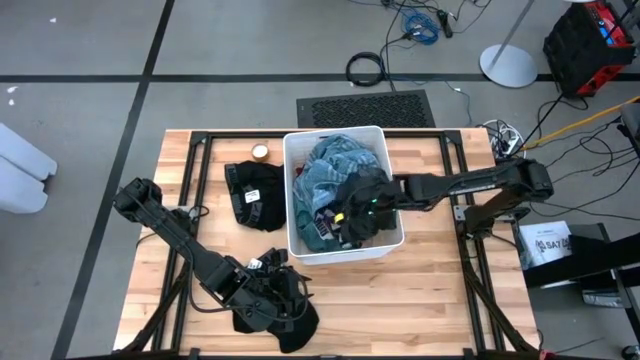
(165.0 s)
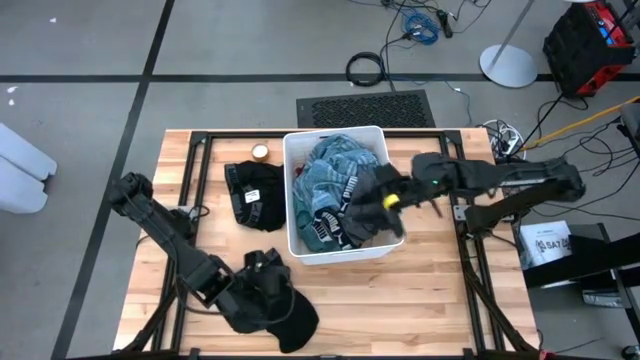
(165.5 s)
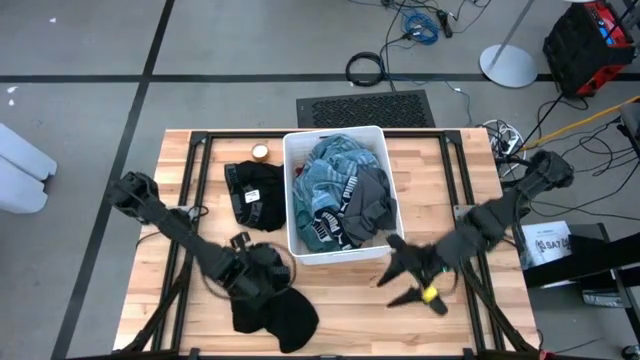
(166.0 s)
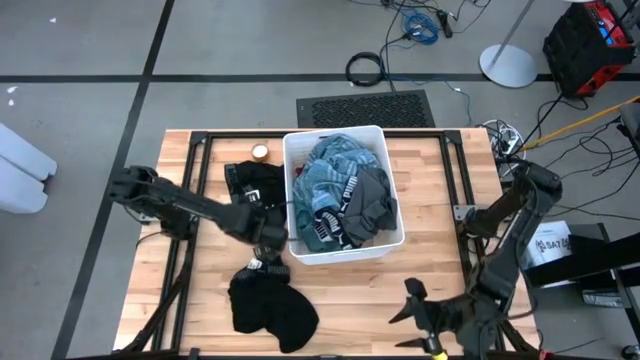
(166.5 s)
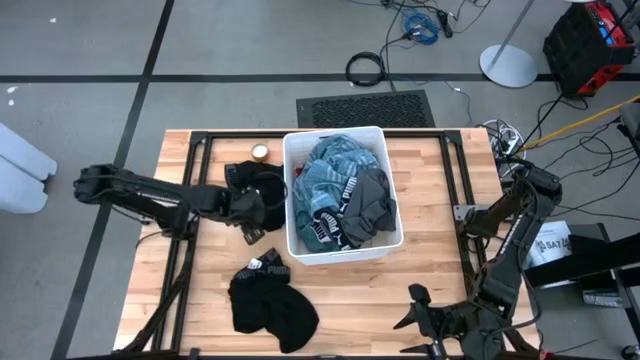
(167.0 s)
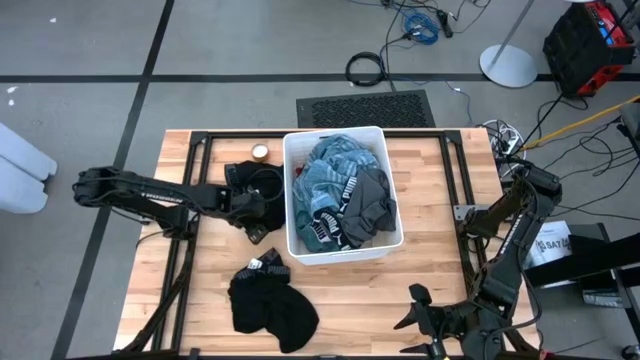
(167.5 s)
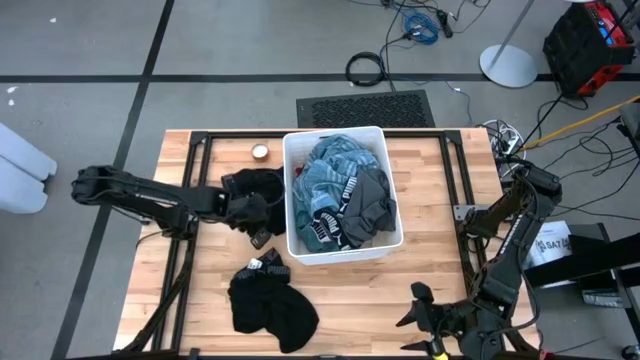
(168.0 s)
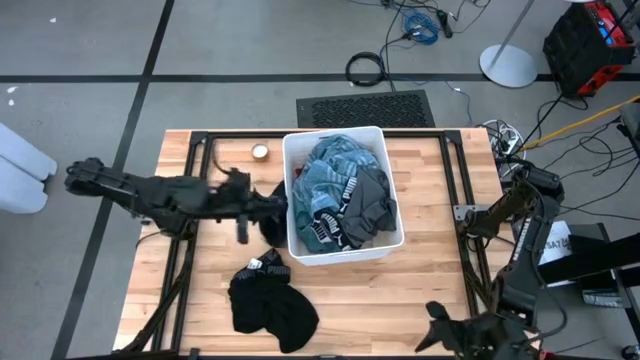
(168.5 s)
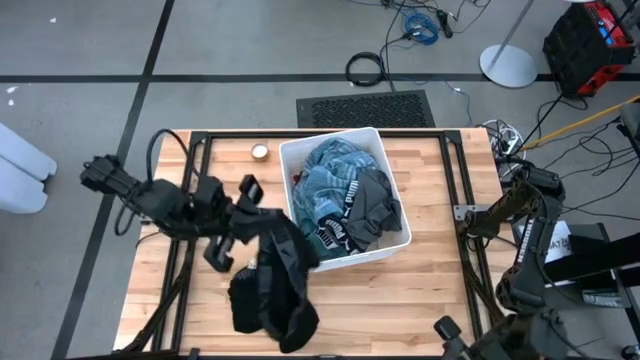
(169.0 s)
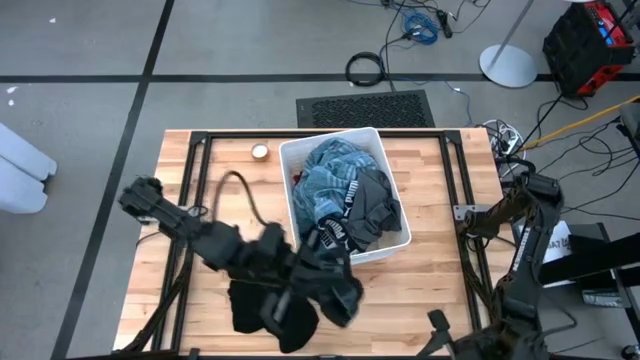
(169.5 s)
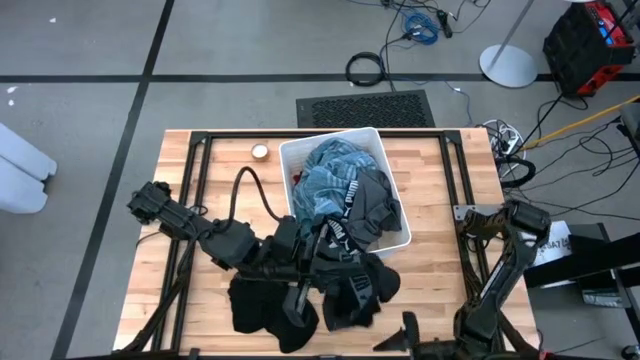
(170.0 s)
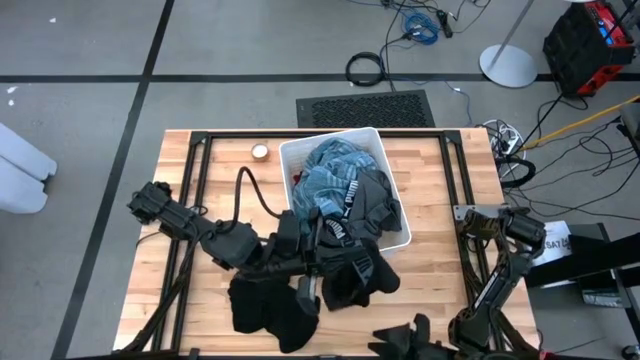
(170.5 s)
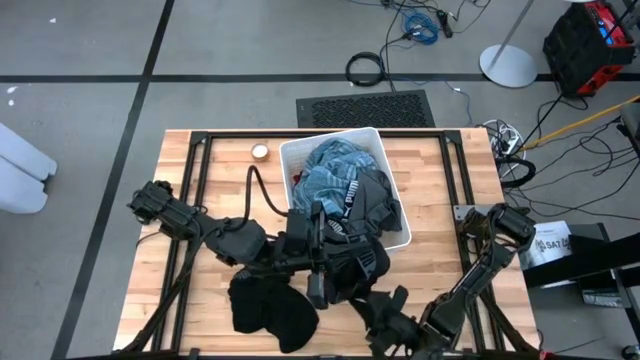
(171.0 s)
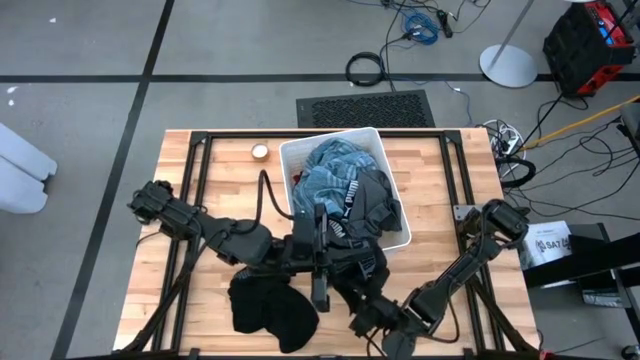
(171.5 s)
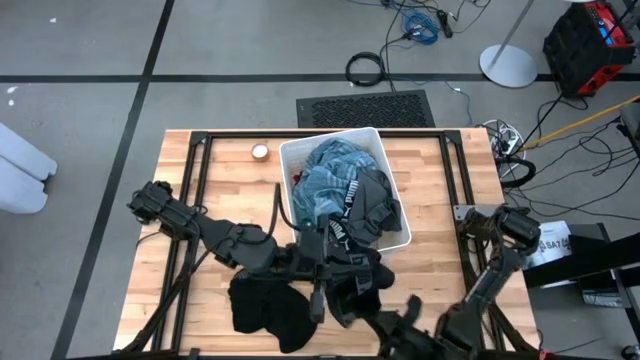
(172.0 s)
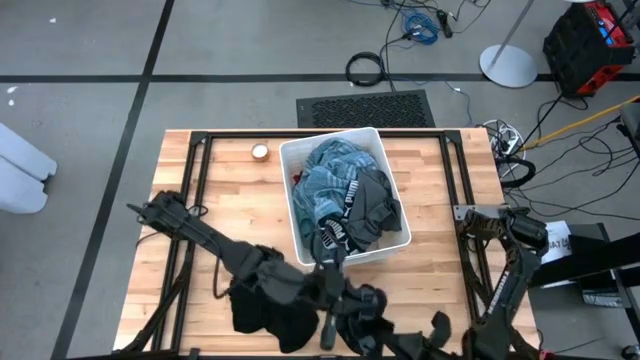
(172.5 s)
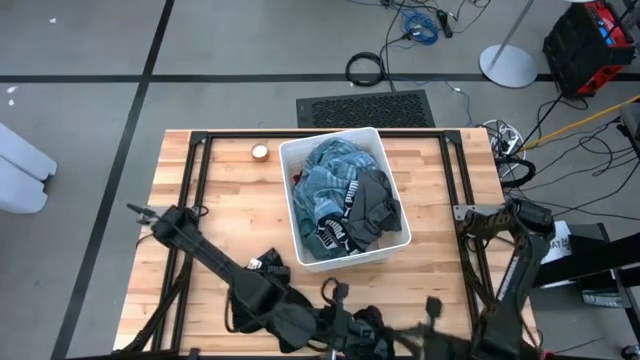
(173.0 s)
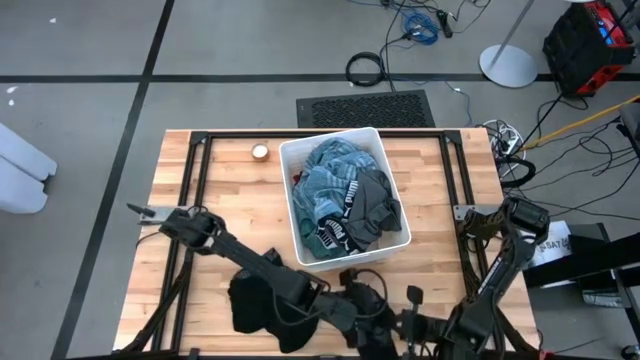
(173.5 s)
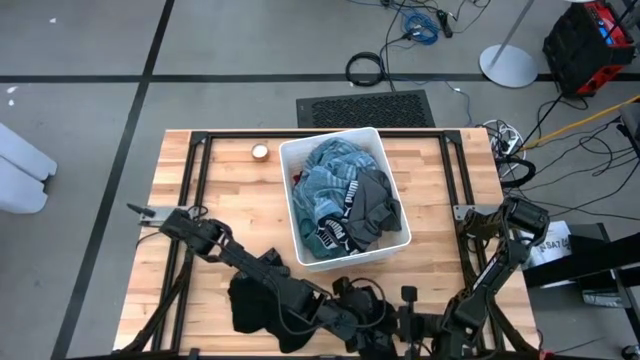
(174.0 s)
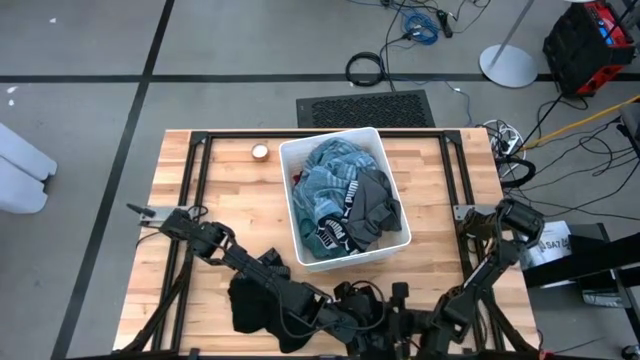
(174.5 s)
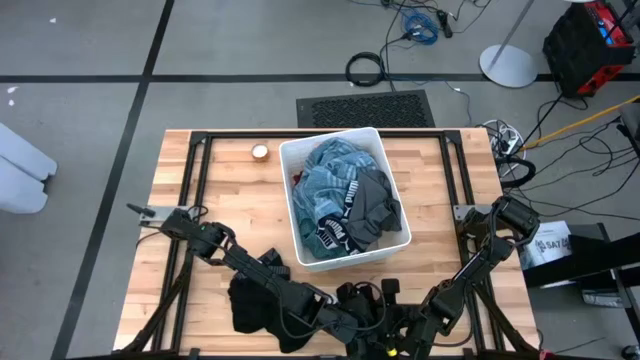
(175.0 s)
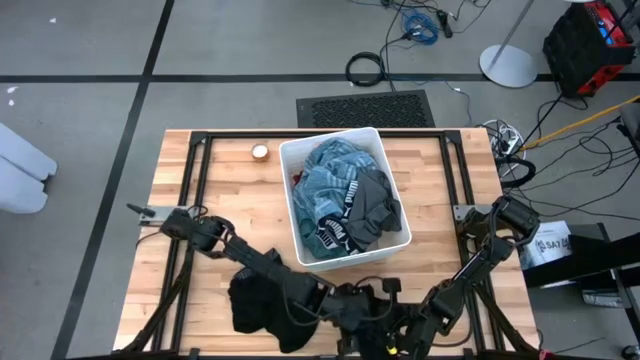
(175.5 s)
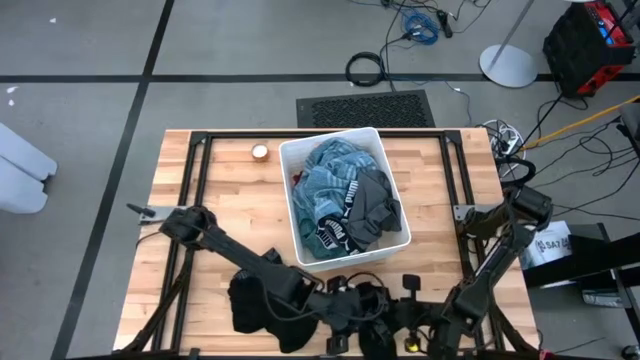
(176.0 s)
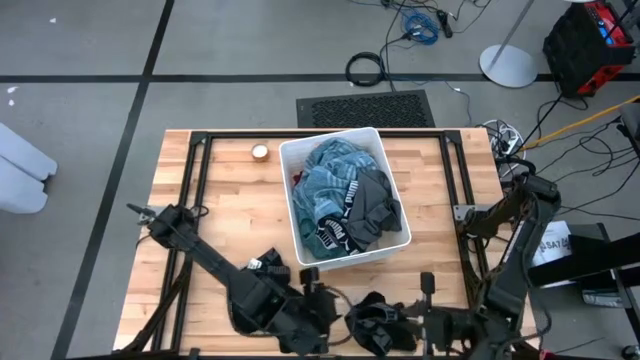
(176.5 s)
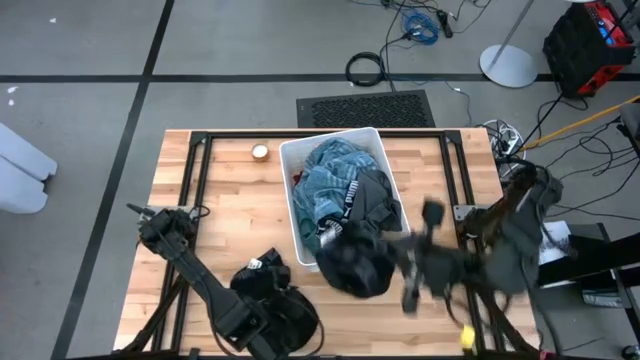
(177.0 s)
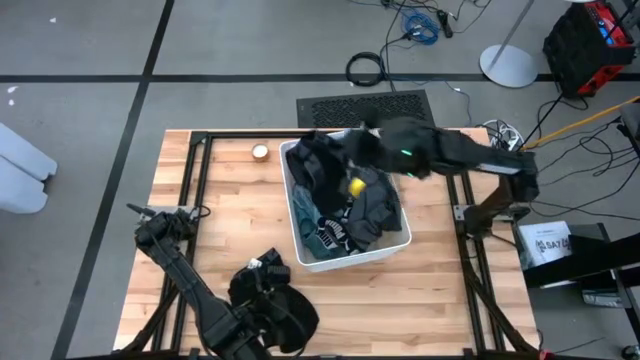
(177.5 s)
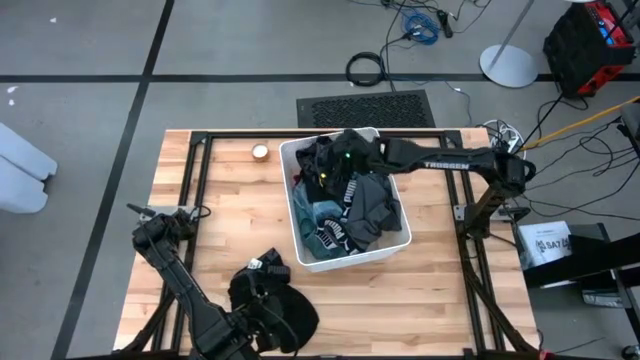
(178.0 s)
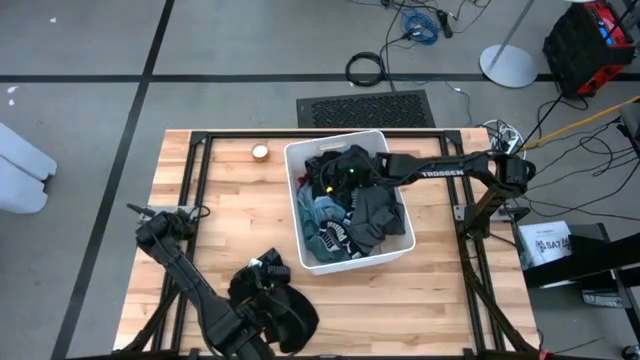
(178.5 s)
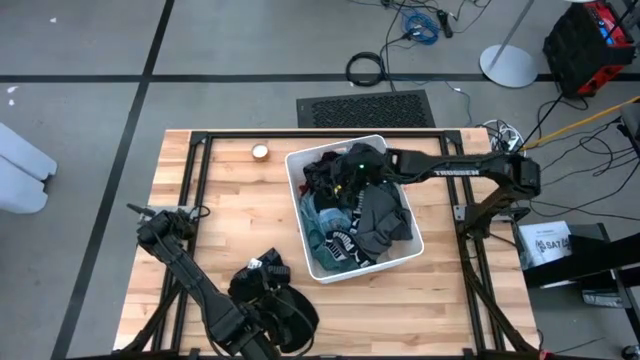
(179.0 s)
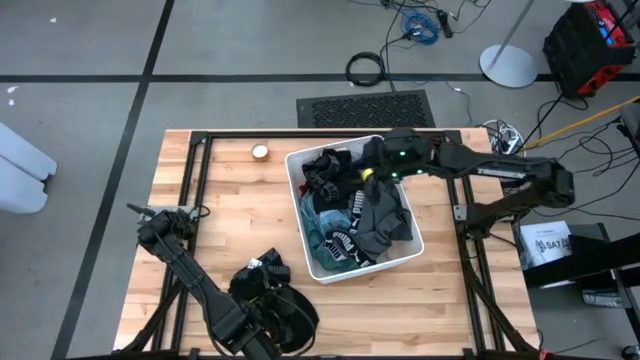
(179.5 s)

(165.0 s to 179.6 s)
Task: Sort clothes
Put the top black boxer into the laundry bin

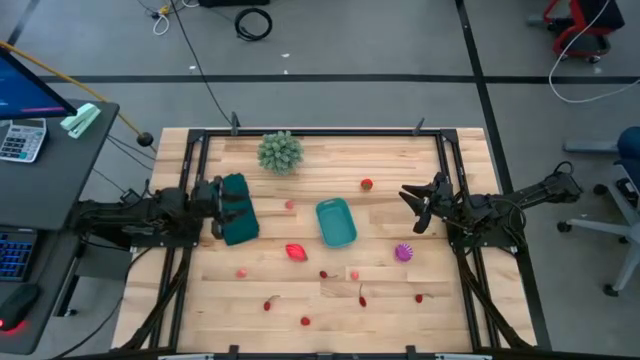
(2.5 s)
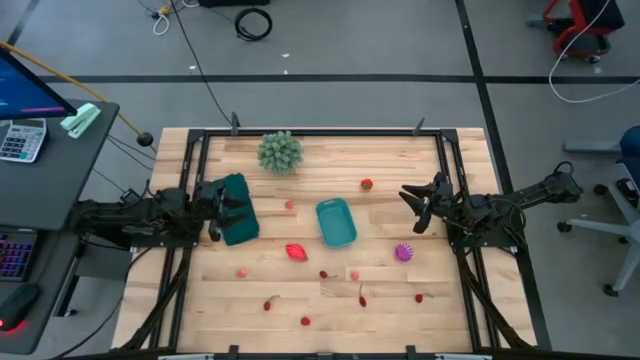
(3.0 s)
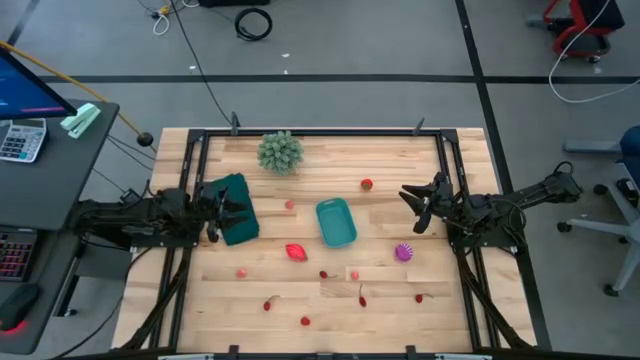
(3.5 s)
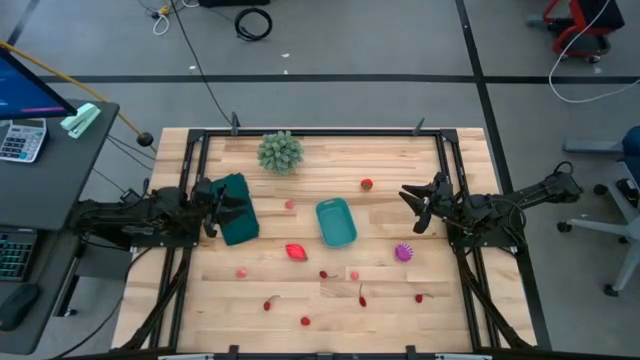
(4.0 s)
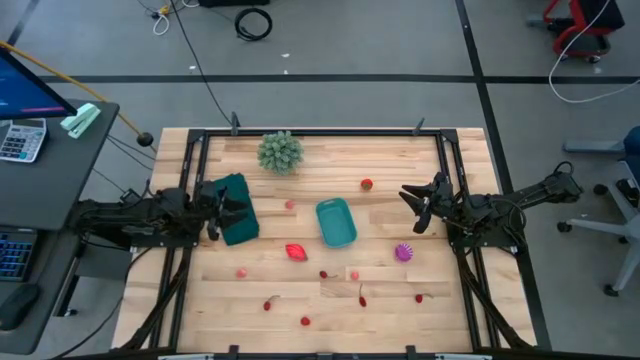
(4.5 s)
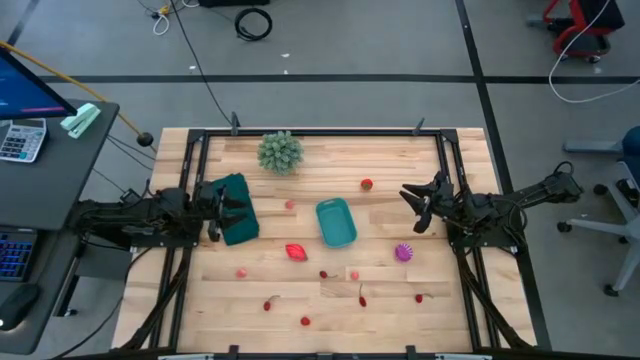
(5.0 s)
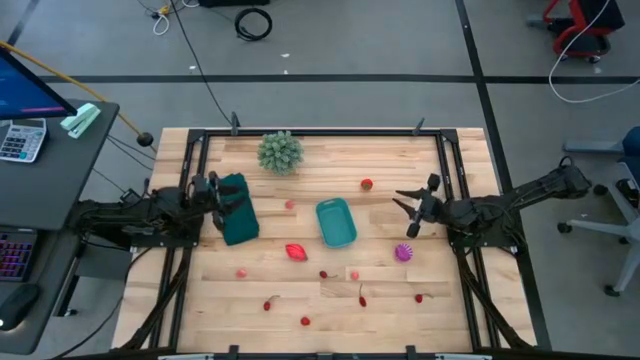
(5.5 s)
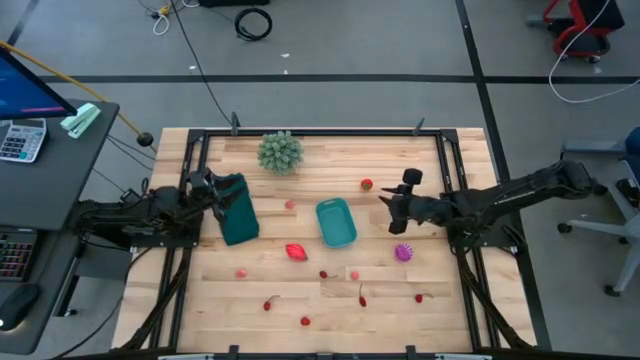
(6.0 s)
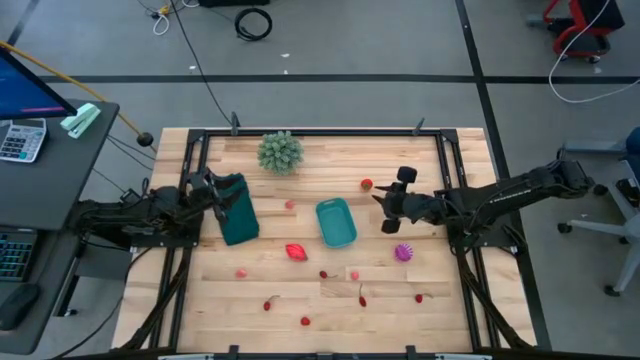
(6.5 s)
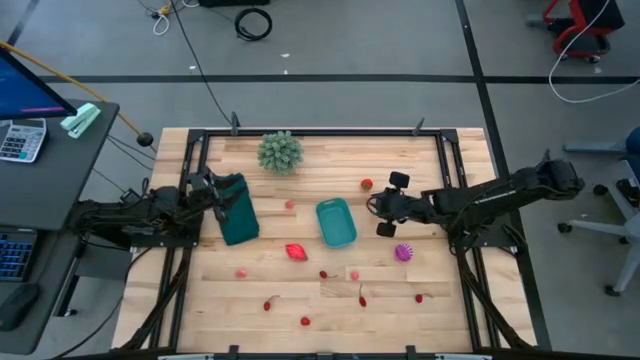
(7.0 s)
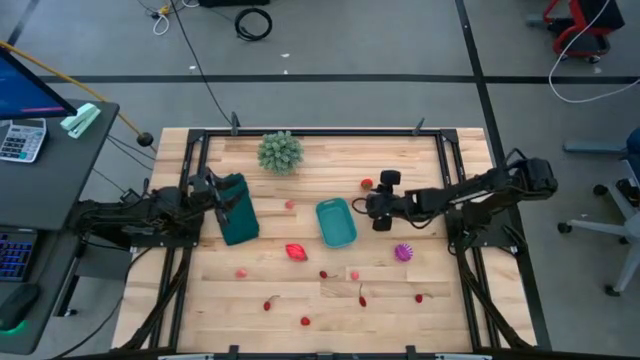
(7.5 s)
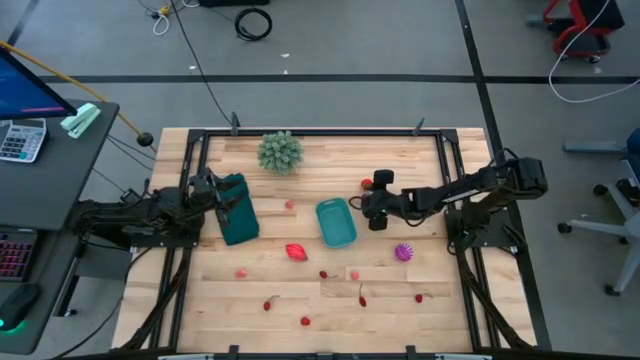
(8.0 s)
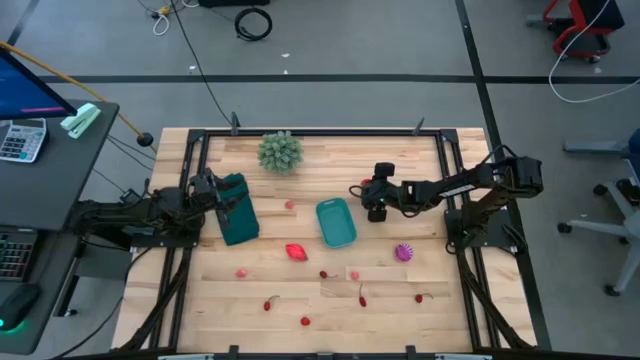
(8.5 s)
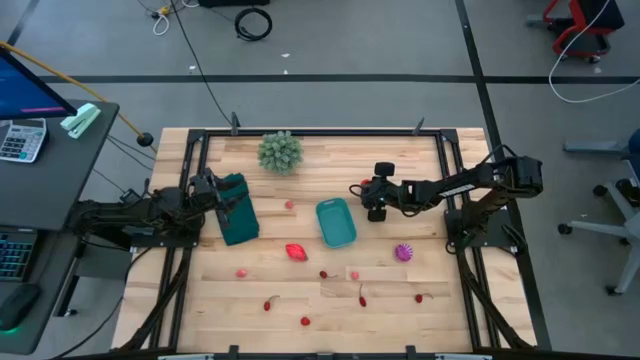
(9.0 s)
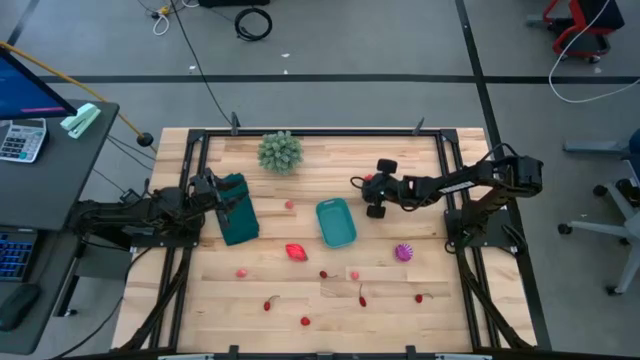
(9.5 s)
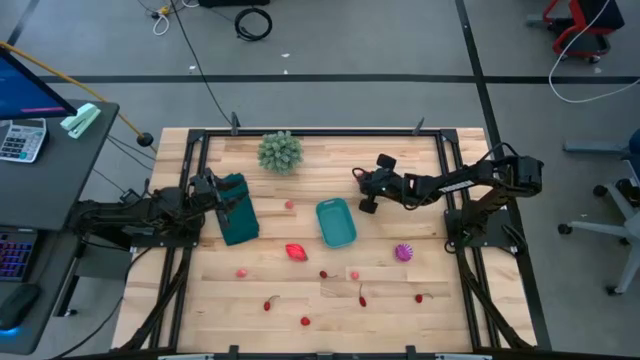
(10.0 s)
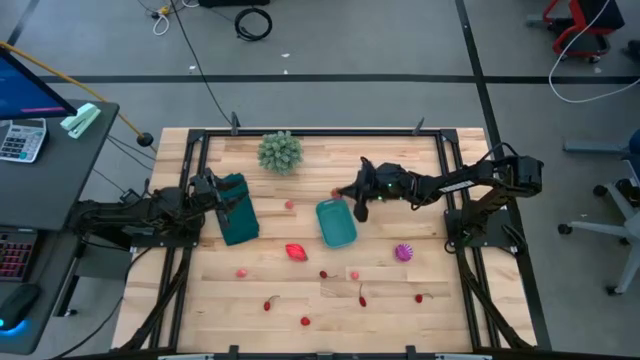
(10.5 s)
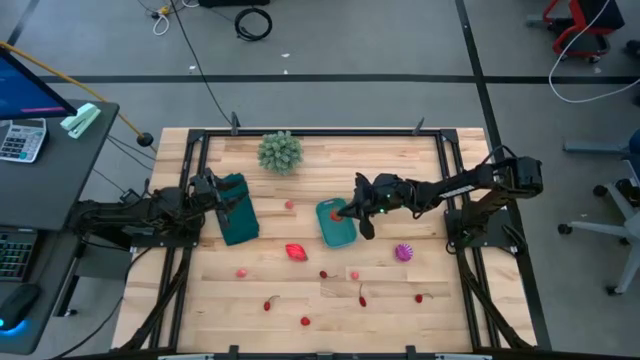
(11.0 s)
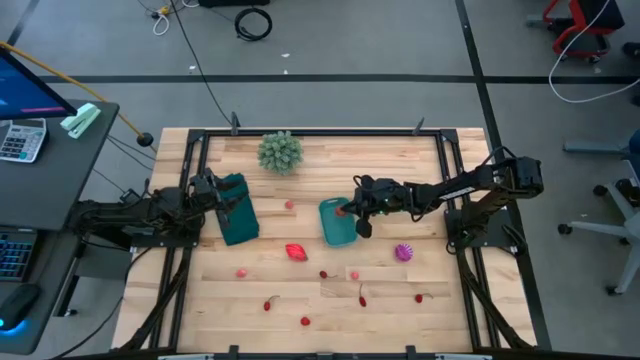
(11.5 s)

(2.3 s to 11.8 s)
Task: Pick and placing Produce into tupperware
Put the red strawberry into the blue bin
